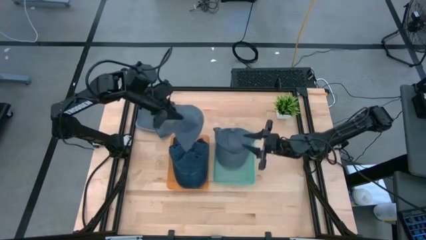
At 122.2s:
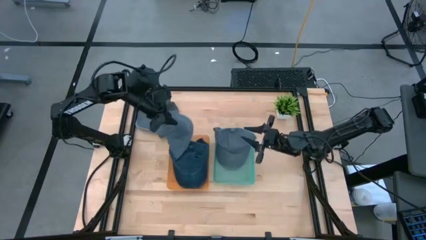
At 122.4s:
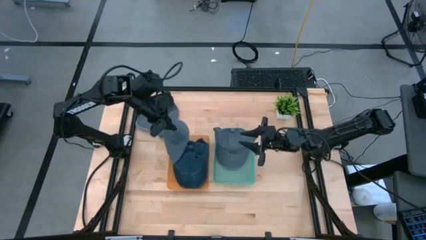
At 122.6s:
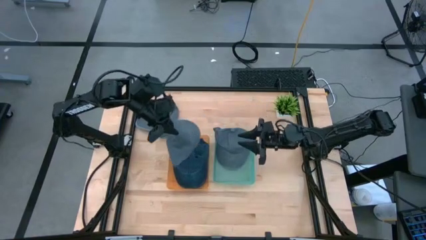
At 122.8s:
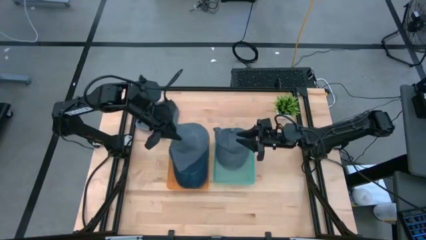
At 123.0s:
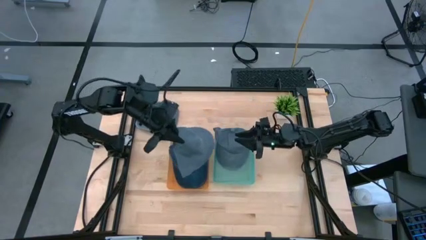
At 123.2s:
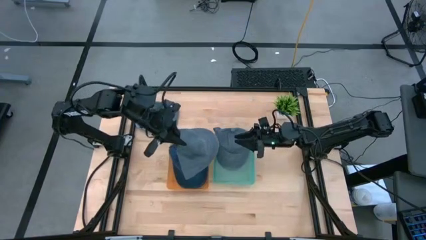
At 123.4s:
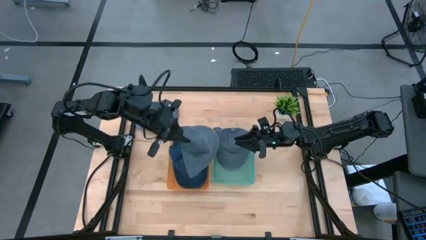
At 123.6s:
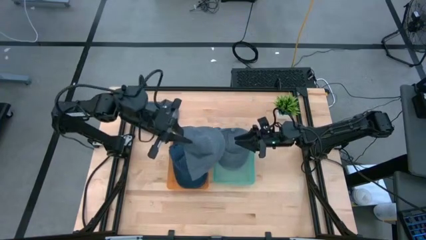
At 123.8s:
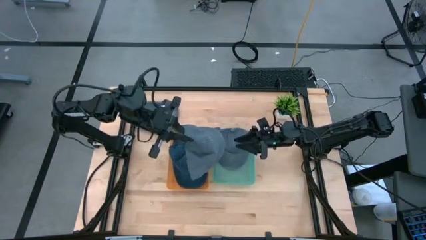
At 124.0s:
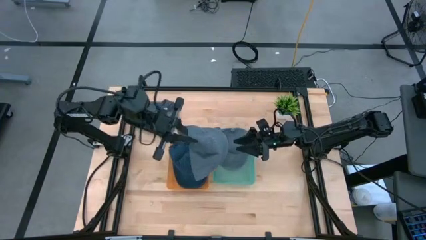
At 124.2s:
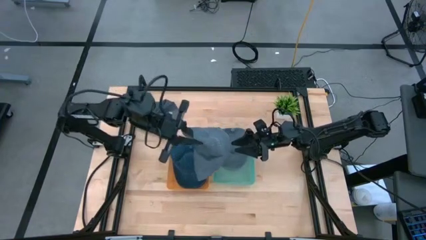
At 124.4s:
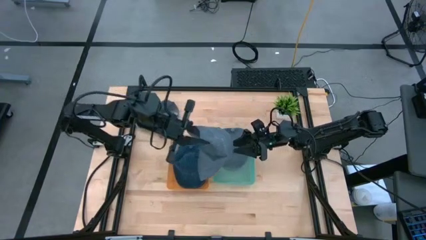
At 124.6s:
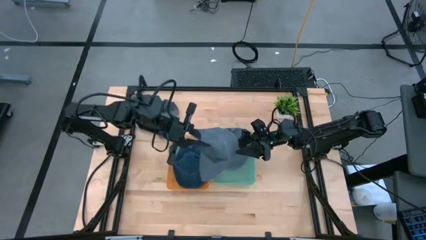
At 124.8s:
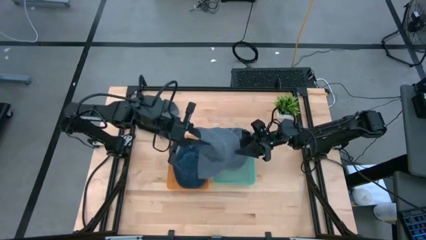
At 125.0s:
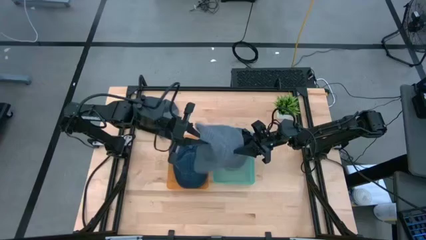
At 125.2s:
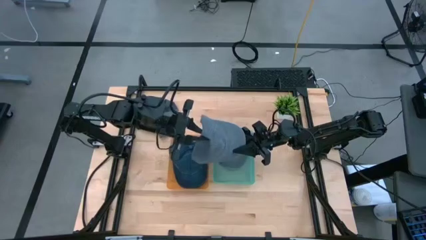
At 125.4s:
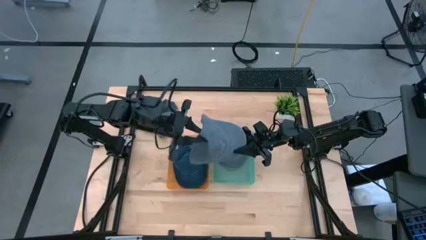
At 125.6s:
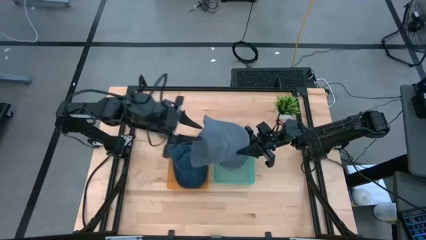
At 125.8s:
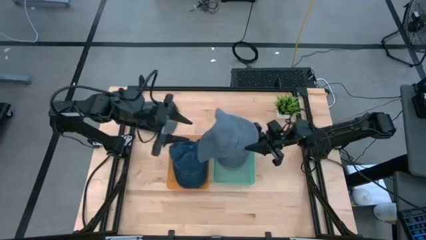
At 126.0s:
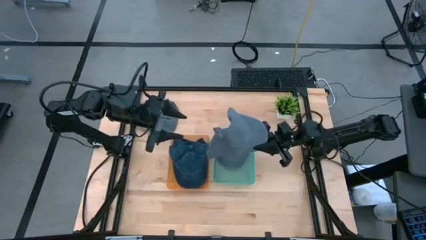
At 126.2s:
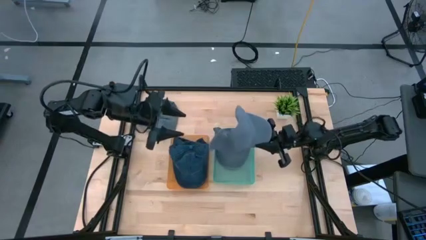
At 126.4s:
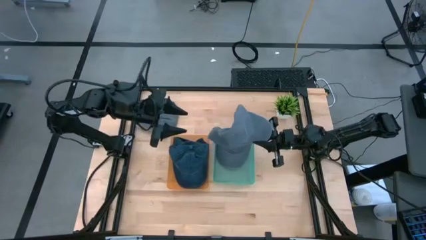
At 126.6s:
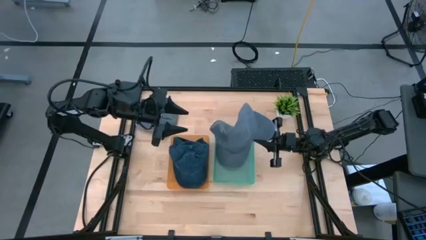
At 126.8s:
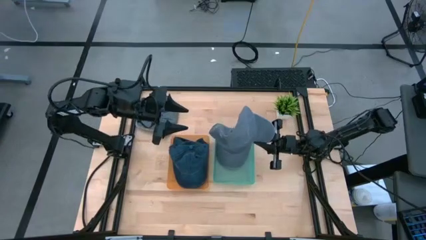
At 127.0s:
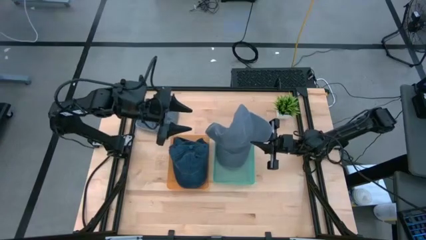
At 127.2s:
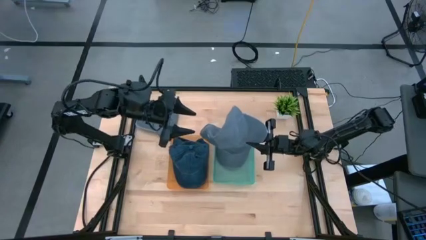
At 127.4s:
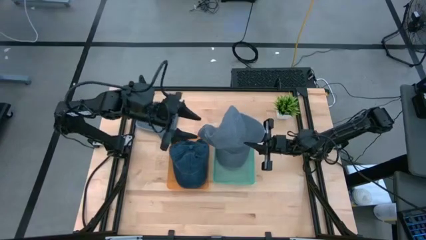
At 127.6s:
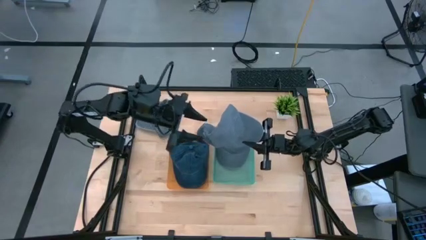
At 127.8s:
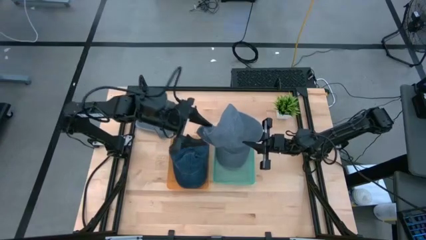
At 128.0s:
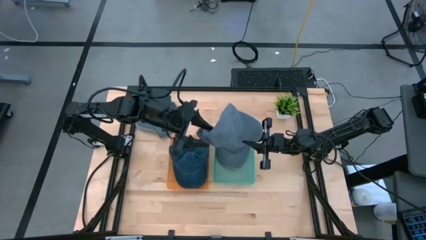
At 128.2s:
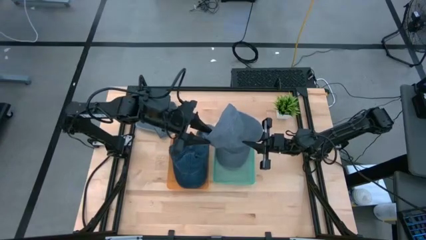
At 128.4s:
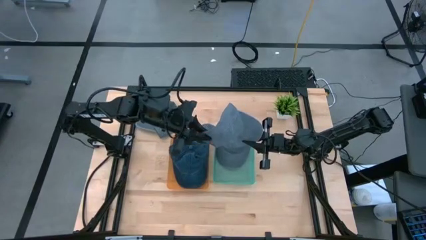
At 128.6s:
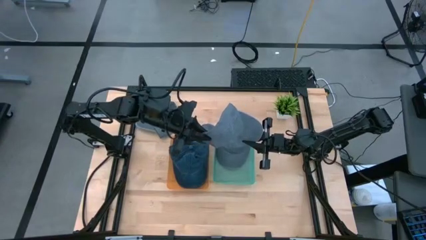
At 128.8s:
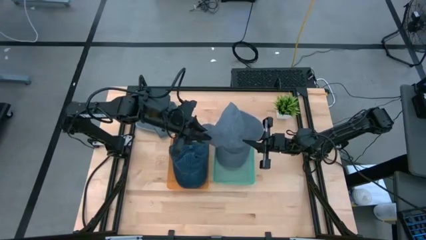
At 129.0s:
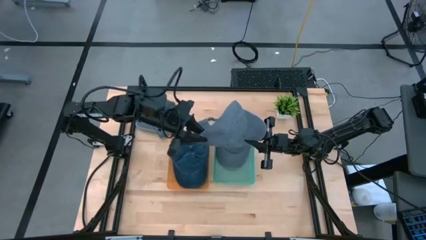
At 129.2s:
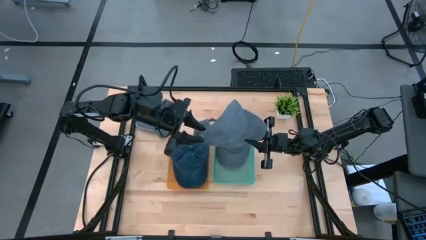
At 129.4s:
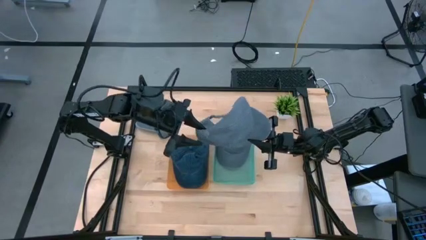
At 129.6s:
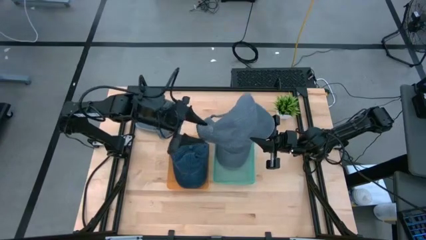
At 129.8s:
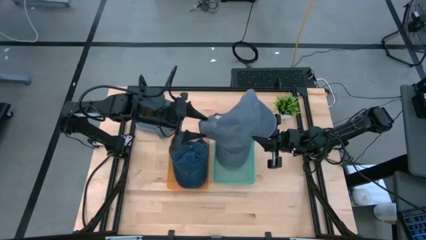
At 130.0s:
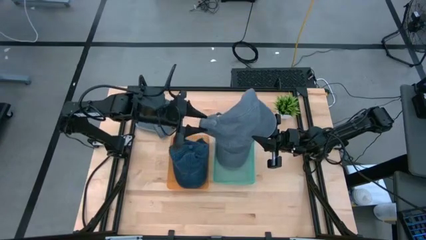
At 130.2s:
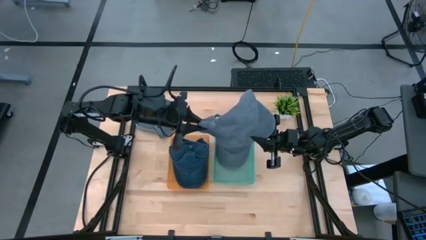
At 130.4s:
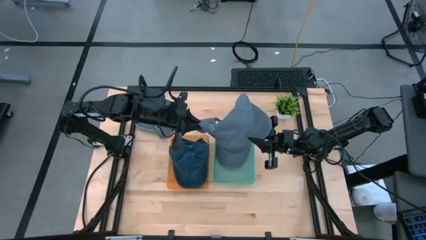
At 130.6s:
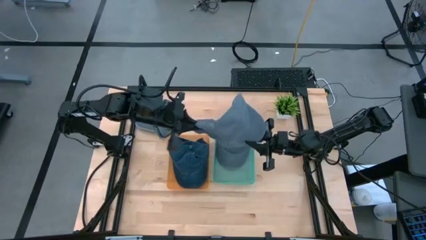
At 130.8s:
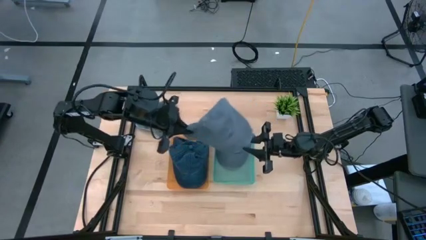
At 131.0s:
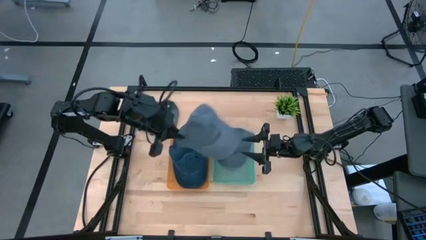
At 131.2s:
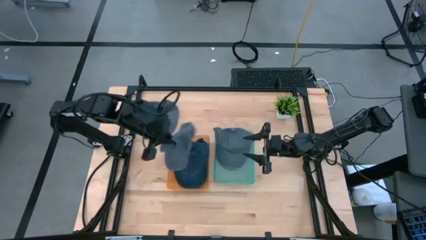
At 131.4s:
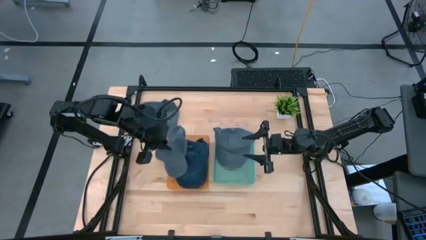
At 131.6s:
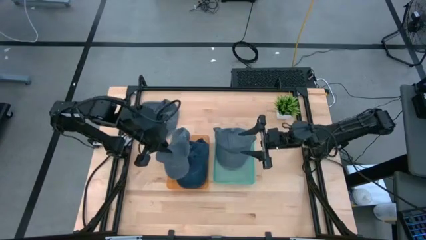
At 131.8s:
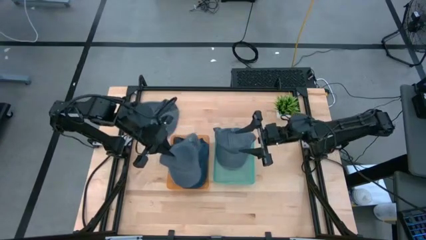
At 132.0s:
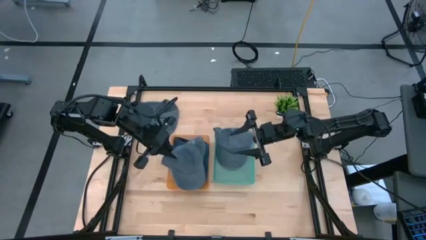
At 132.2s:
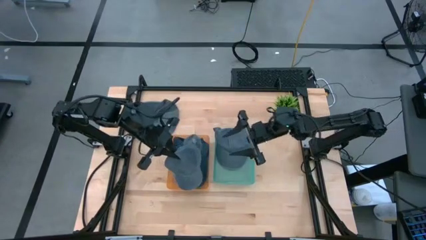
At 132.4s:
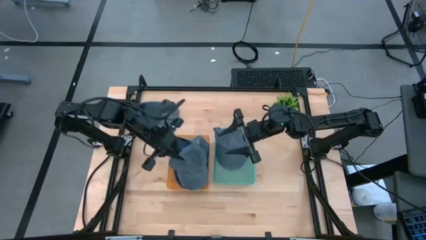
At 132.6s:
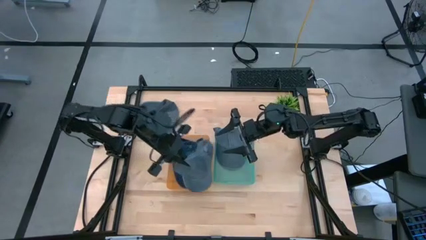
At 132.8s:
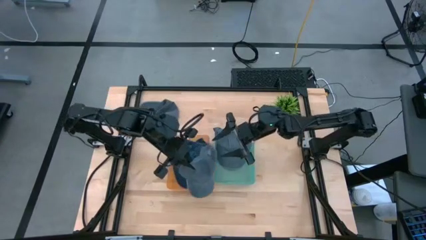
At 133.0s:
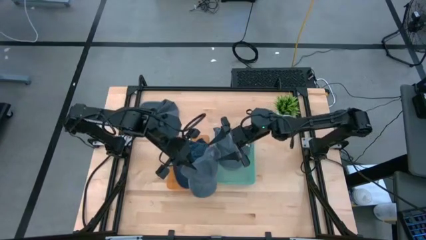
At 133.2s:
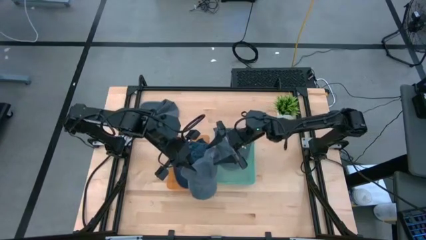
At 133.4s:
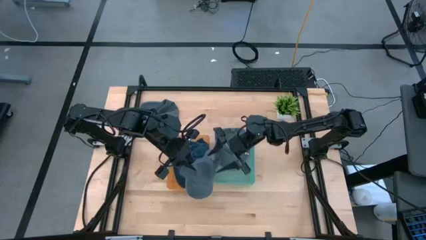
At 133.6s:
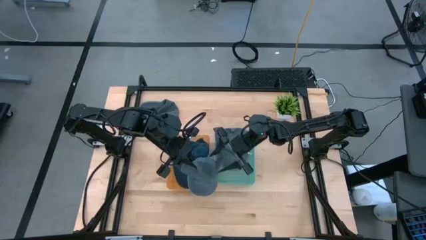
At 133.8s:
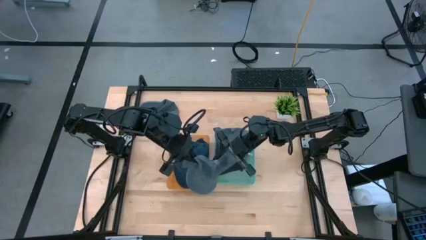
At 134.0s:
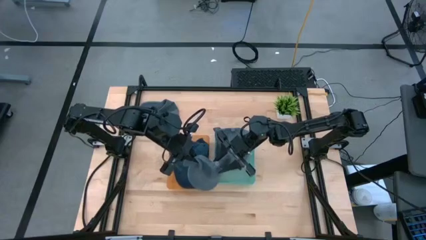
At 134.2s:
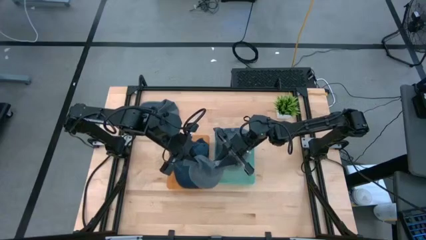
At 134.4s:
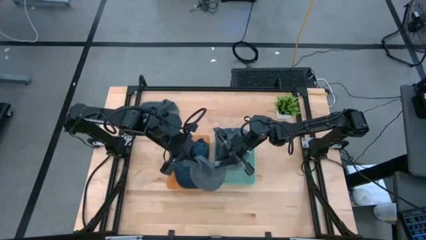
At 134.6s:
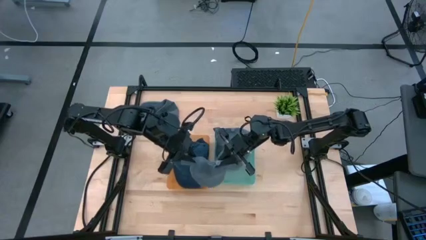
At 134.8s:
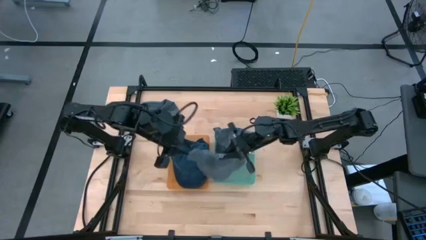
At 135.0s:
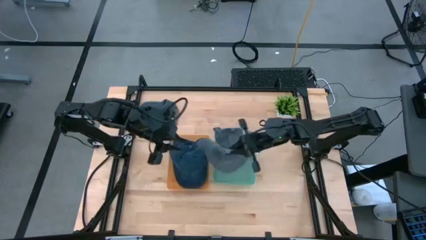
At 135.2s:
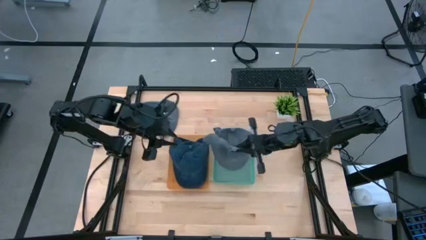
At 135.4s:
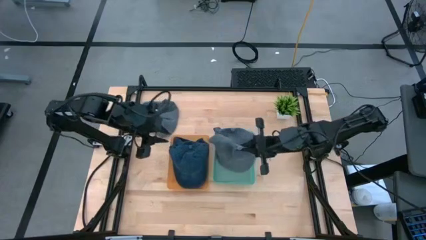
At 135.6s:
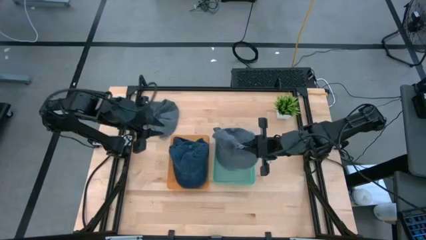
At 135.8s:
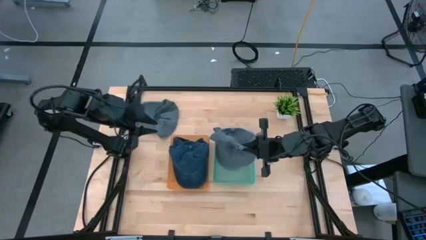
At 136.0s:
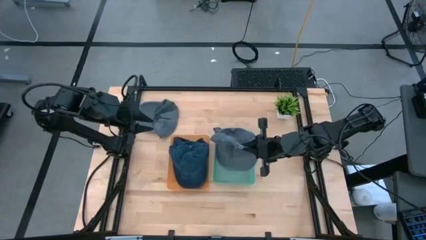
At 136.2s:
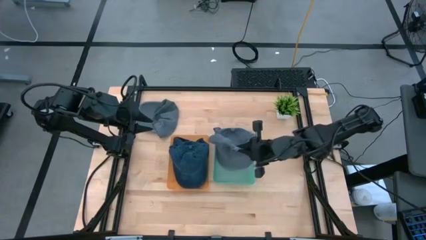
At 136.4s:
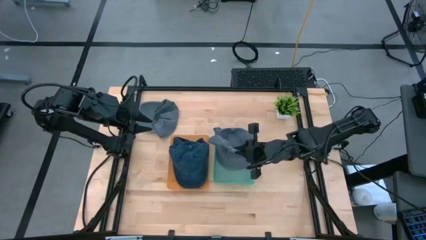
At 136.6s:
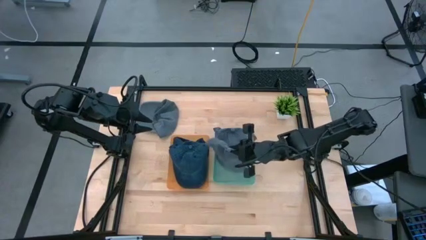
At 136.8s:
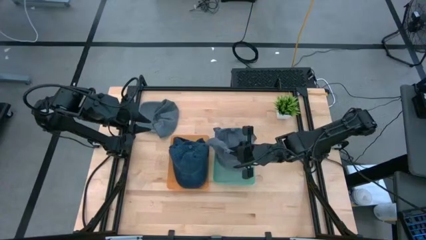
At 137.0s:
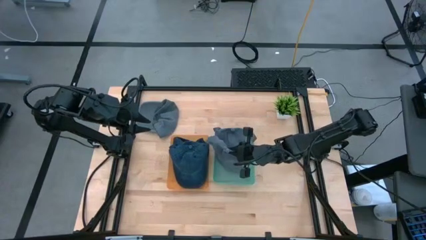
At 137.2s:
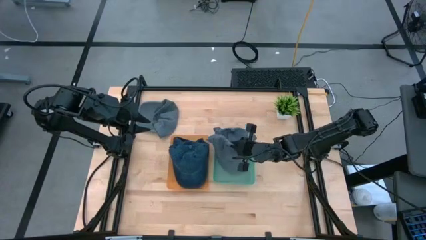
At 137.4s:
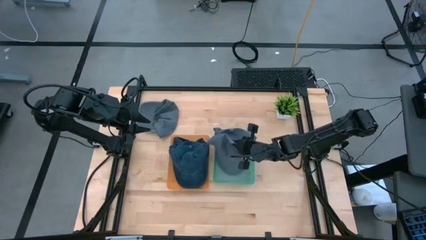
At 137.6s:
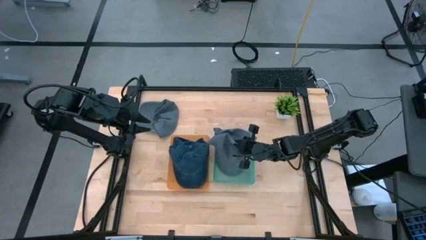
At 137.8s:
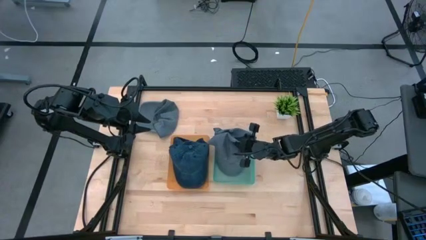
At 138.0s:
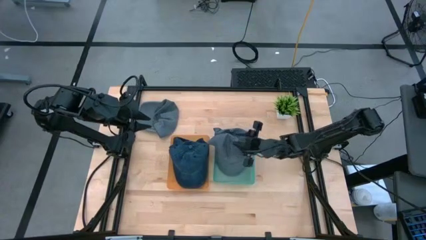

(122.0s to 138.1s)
Task: Pick & Place hat
Put the bottom gray cap into the green bin

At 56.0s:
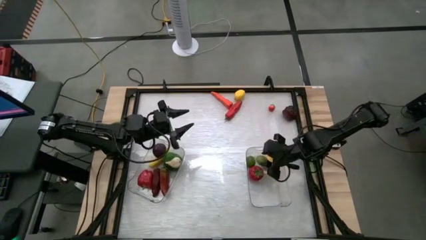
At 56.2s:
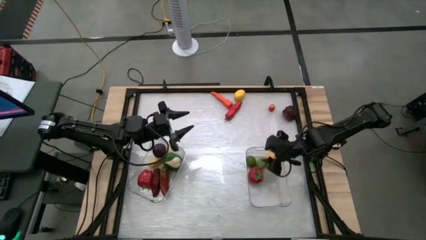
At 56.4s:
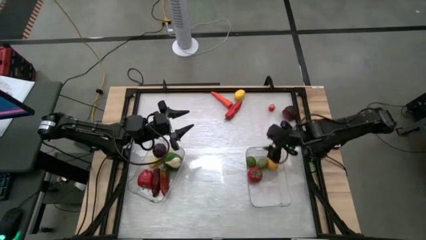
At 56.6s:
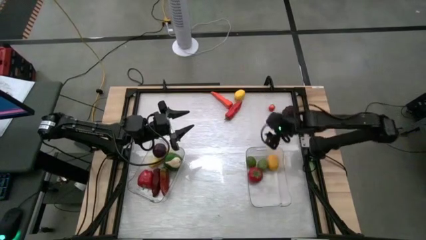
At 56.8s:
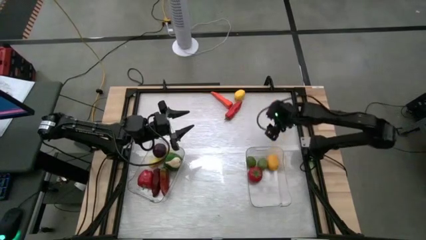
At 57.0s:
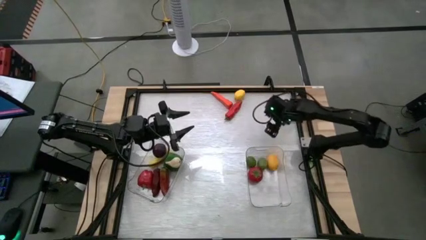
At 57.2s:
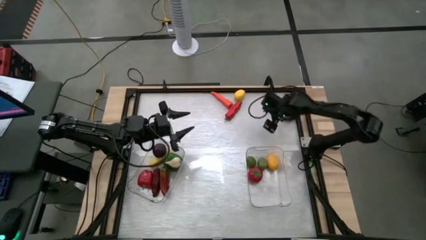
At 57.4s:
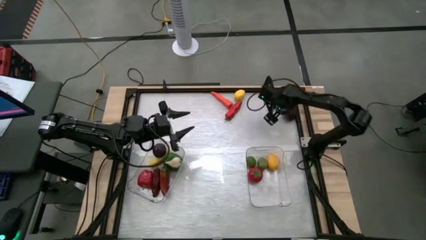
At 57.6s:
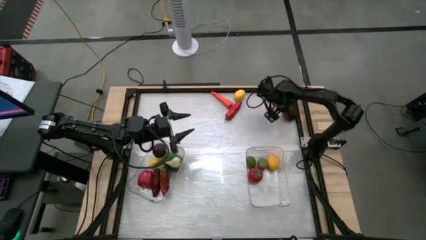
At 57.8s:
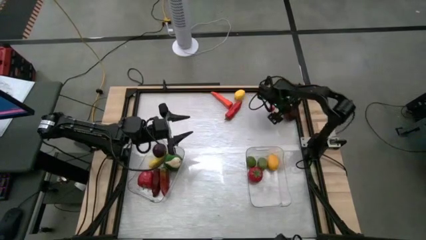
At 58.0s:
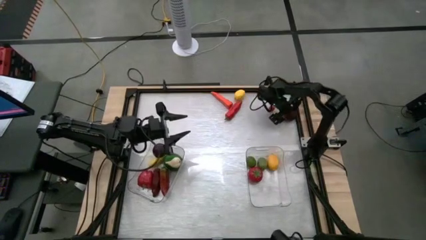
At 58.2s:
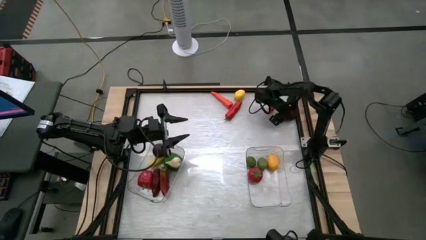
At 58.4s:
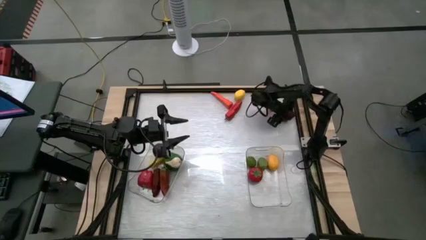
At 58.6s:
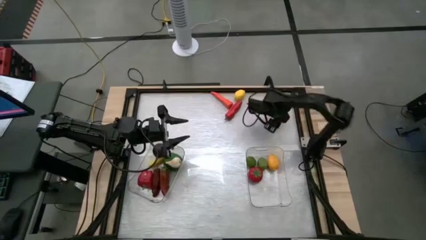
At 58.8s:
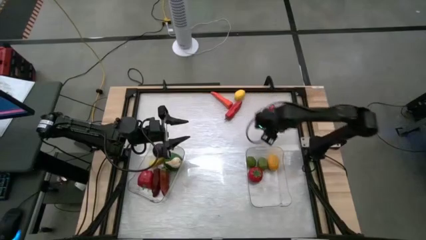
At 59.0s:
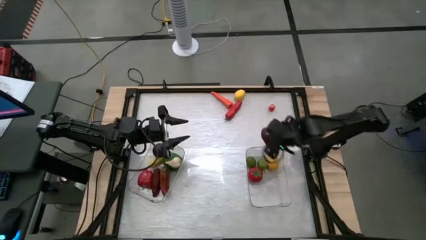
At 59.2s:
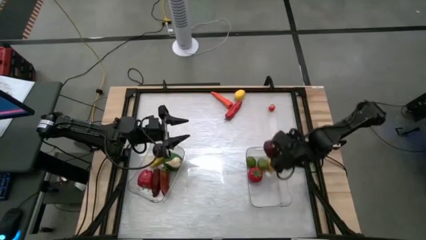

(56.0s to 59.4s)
Task: Sort produce into baskets
Put the red apple into the right transparent bin
